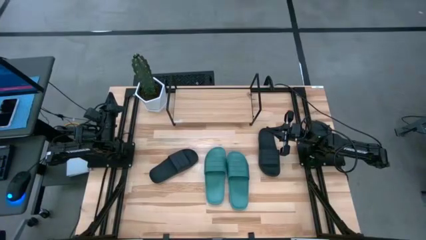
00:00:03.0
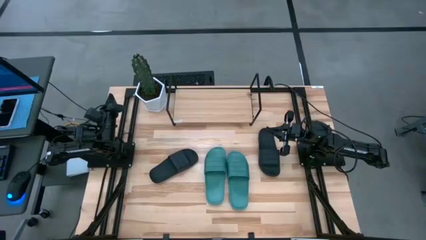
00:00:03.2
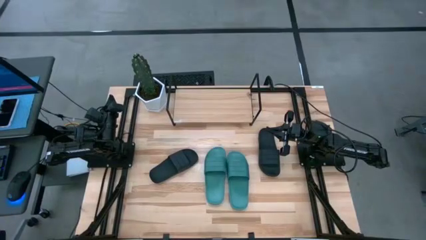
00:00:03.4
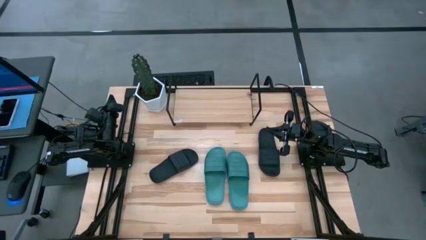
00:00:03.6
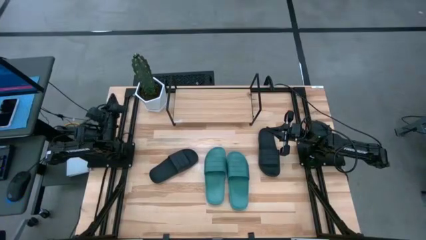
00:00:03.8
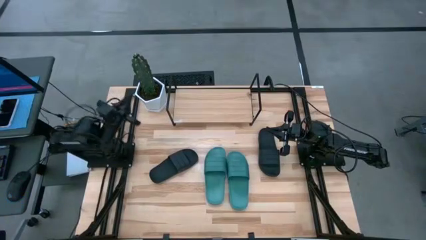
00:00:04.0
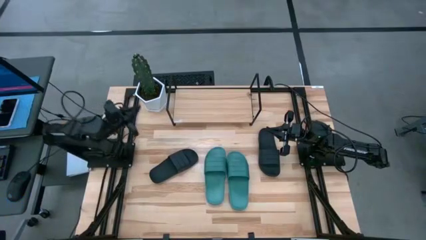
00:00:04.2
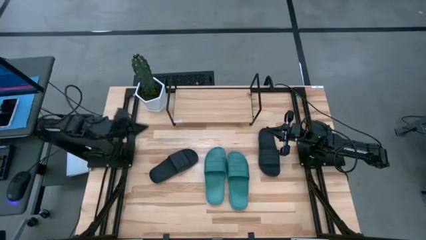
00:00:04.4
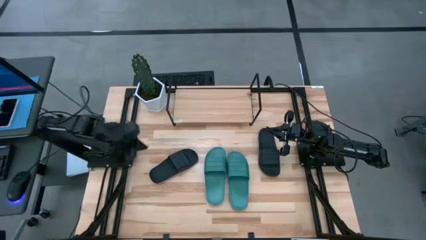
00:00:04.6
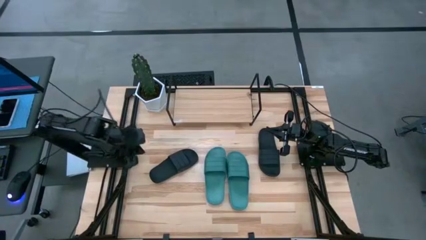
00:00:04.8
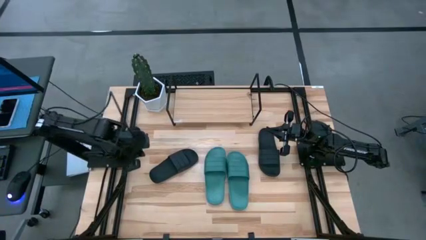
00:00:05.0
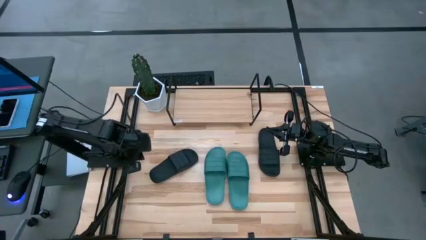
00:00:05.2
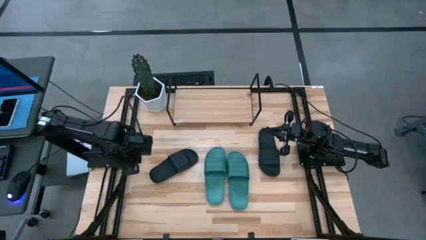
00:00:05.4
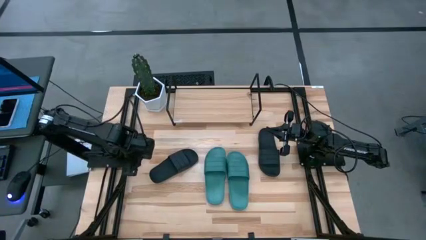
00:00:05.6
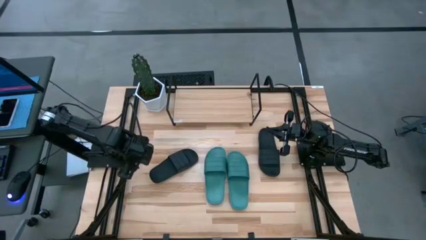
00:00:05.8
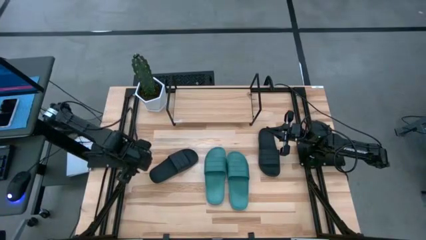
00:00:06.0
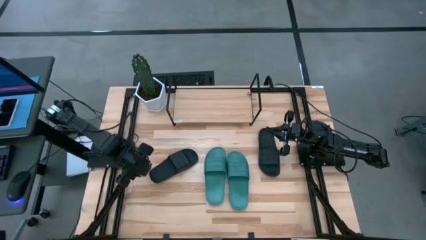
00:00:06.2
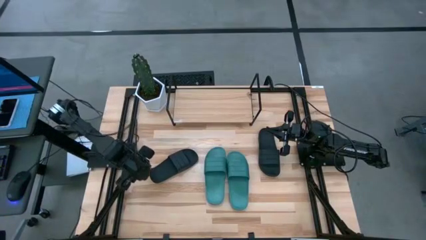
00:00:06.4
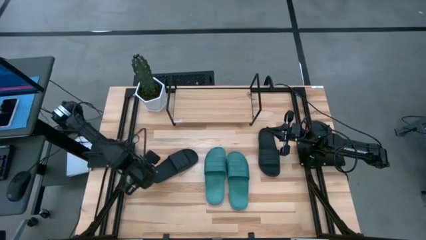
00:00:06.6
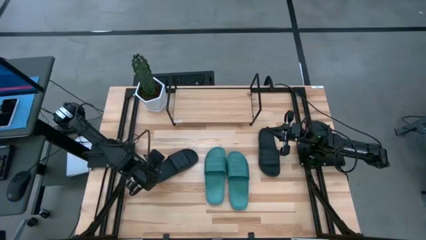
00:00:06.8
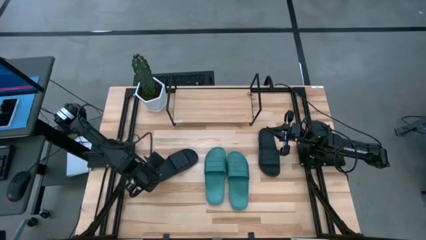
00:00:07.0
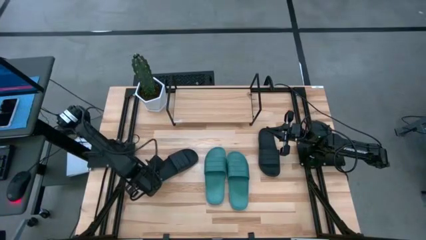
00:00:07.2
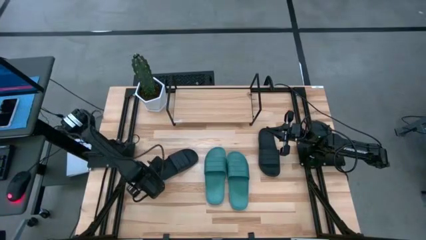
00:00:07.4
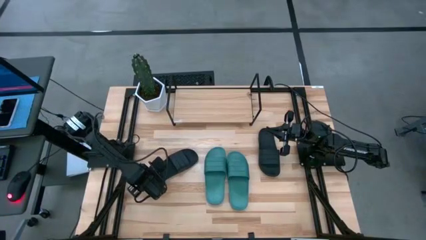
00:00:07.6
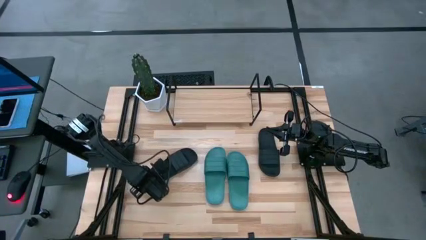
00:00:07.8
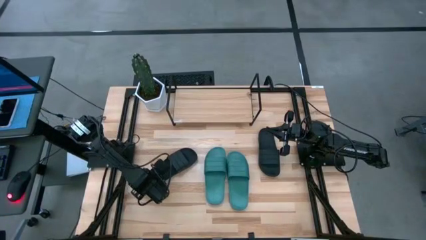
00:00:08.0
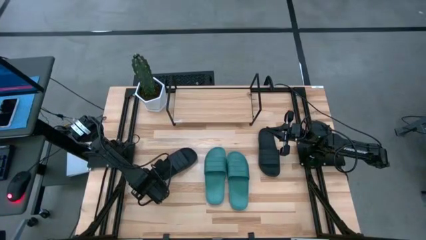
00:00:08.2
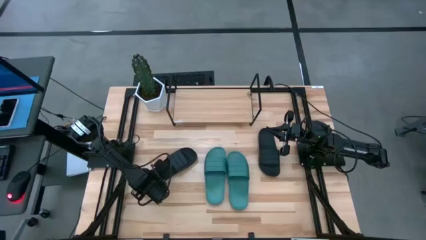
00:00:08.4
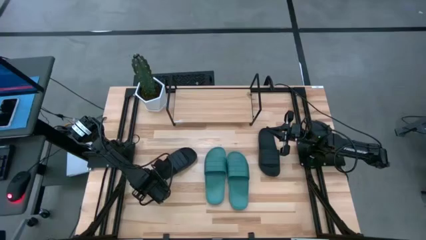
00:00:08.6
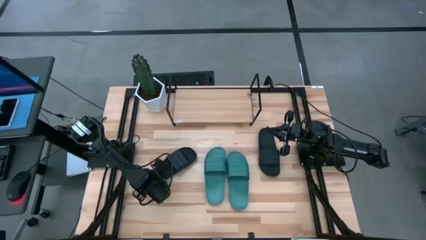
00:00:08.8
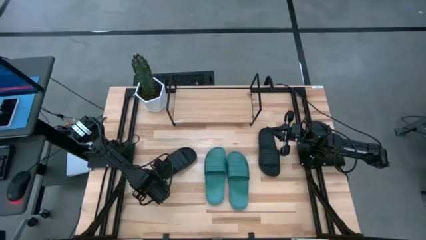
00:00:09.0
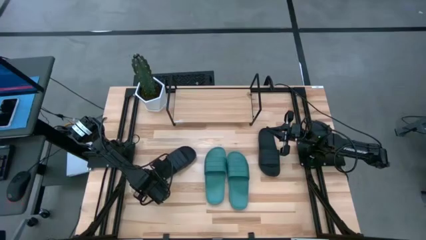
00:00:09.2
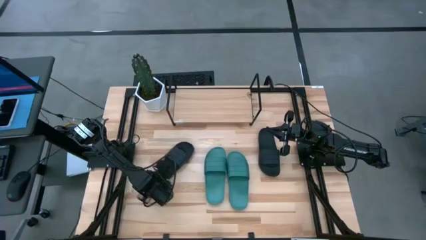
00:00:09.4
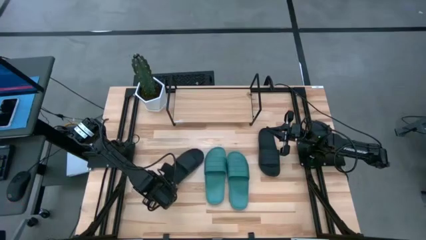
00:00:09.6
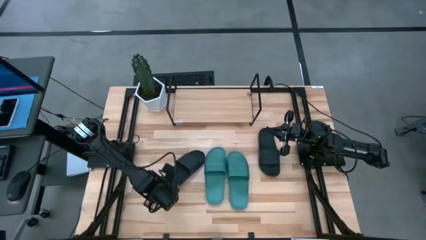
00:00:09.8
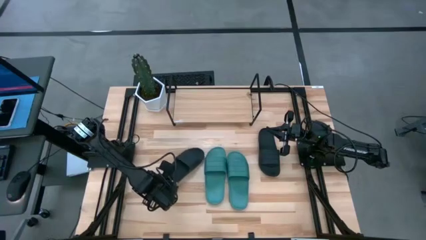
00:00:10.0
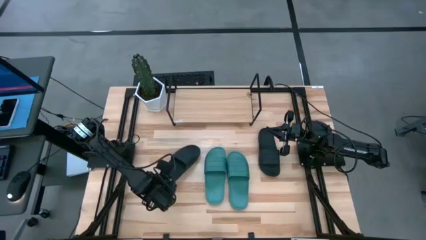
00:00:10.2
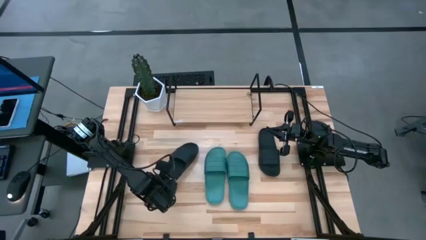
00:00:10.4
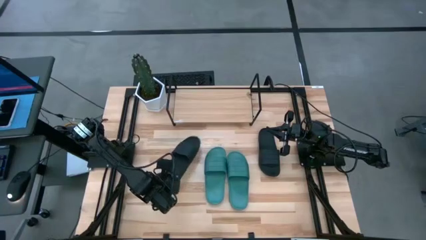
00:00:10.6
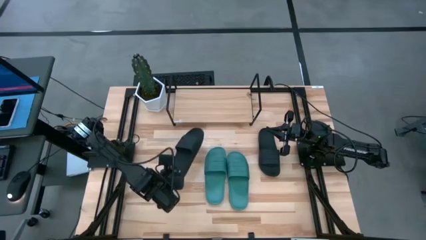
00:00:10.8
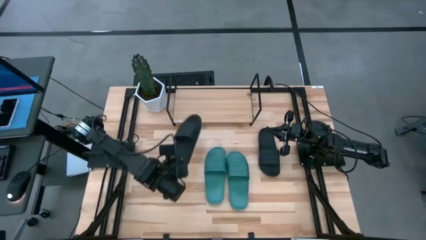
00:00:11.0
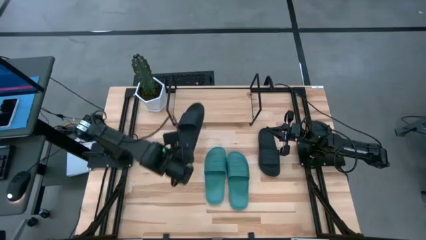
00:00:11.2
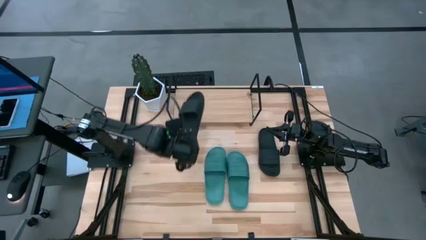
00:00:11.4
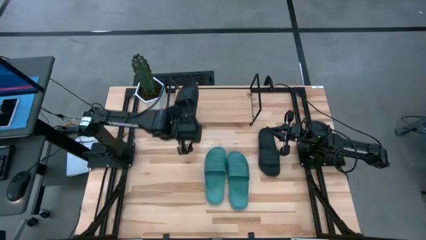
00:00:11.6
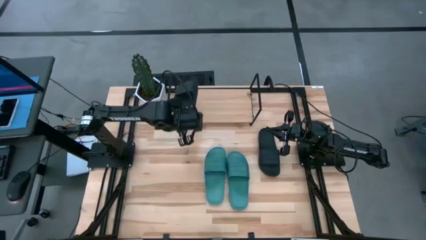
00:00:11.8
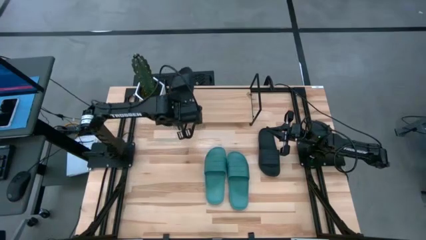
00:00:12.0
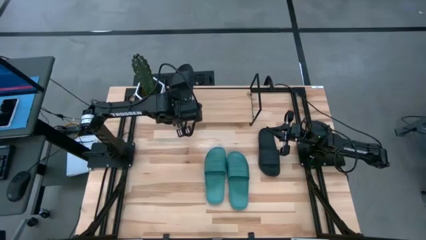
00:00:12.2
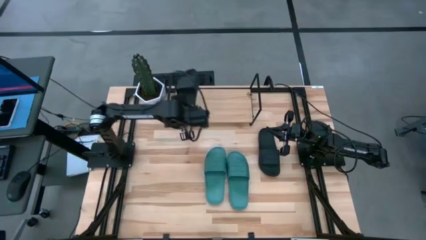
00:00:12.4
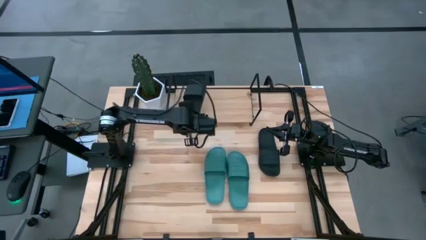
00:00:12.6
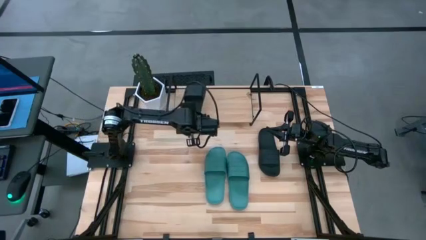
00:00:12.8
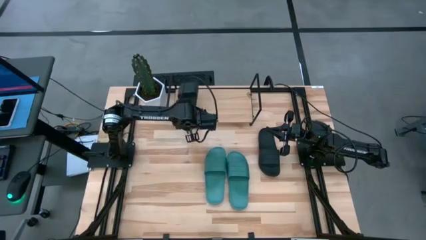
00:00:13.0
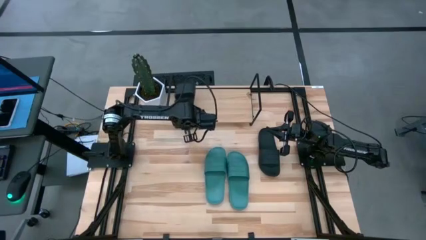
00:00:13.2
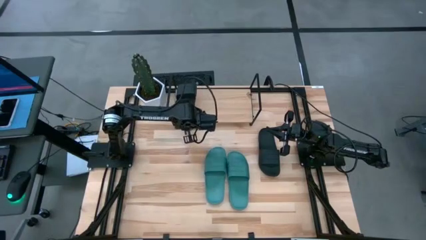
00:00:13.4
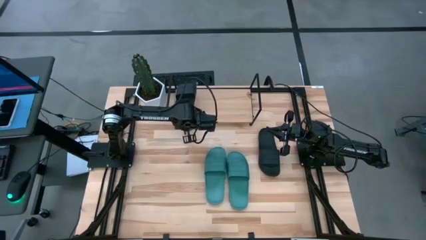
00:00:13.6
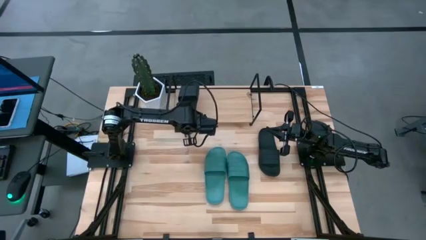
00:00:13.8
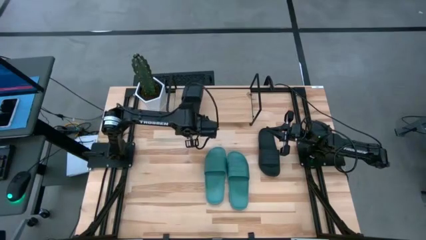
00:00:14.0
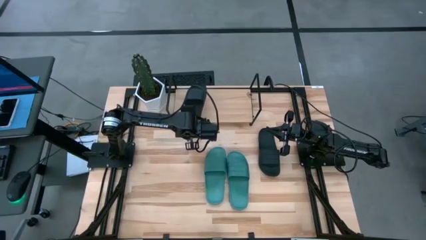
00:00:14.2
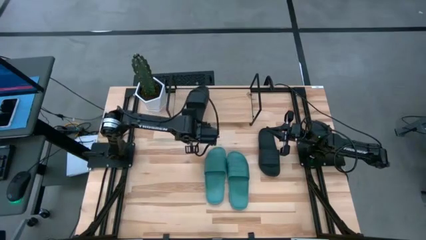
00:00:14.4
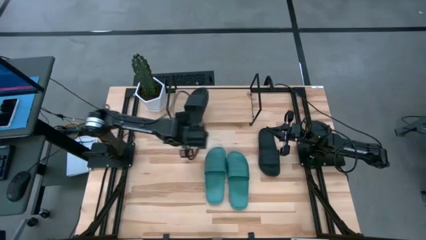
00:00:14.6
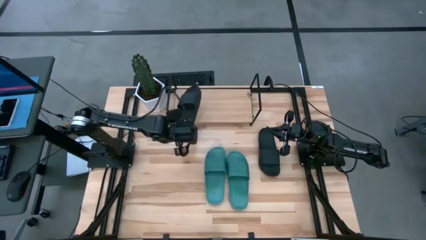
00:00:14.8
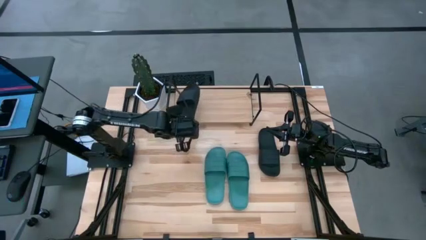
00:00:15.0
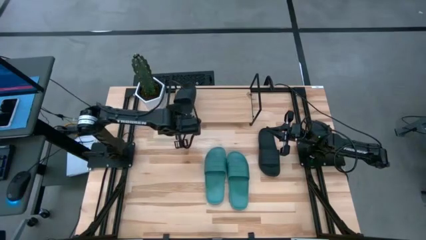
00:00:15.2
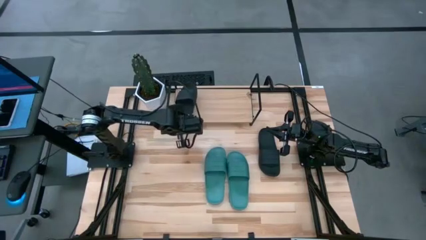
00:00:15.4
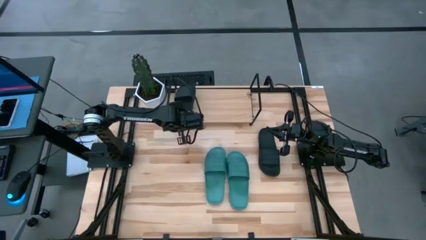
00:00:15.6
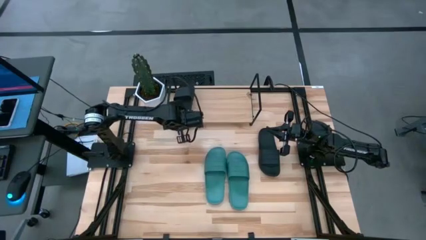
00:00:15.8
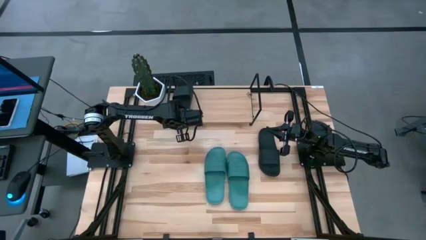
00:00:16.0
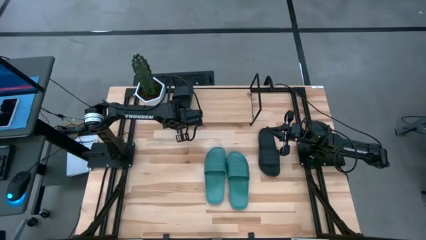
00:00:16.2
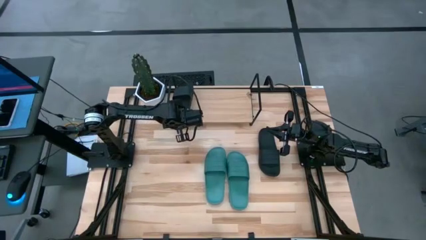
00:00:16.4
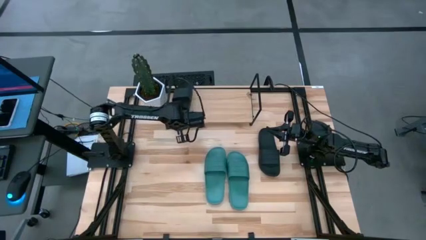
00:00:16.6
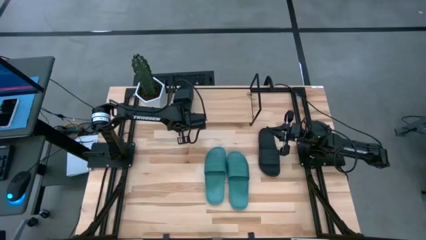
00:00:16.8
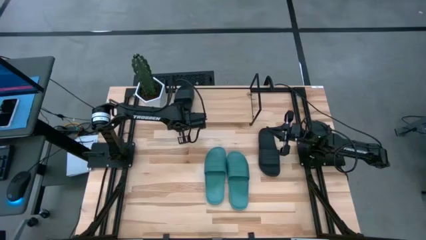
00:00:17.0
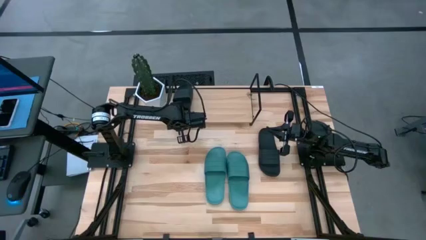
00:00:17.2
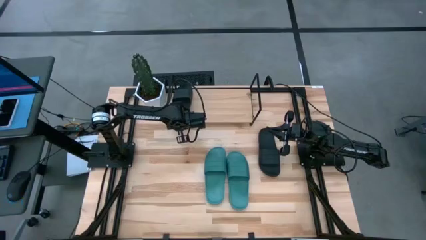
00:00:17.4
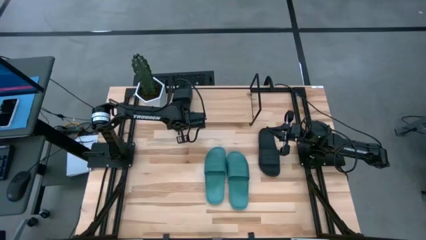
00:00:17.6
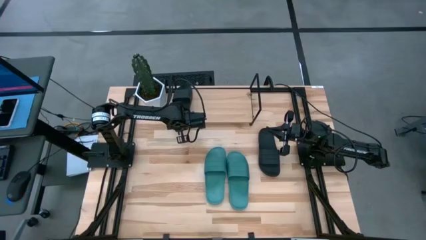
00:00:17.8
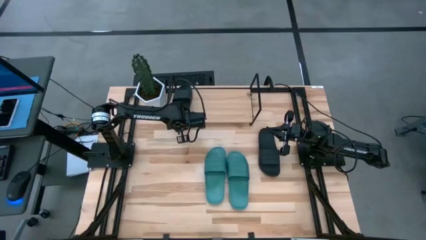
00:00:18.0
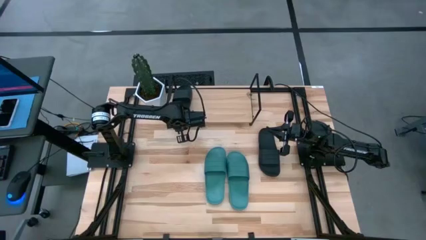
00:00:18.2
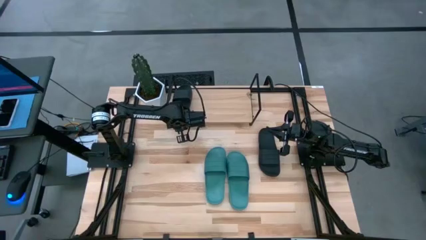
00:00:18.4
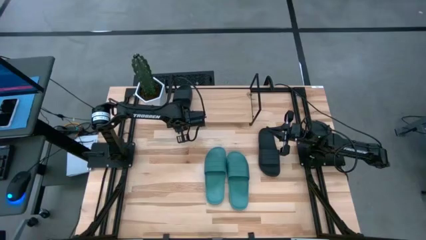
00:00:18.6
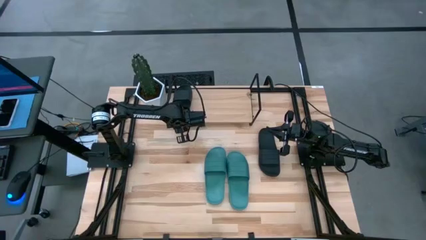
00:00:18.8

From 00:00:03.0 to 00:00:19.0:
Task: Pick and place slides into the shelf
Put the left black slides on the shelf
